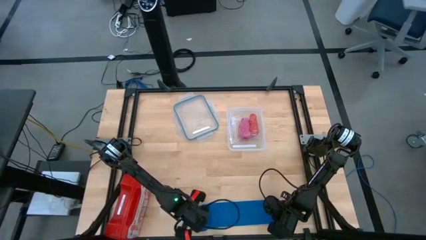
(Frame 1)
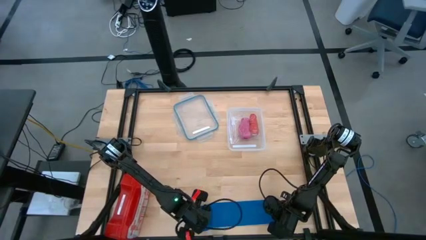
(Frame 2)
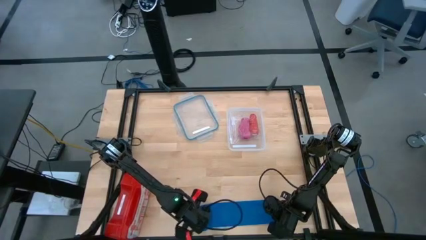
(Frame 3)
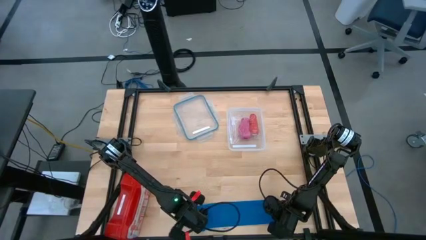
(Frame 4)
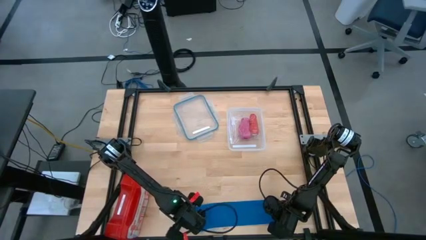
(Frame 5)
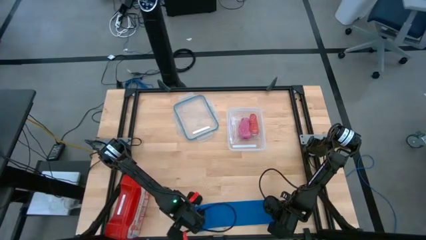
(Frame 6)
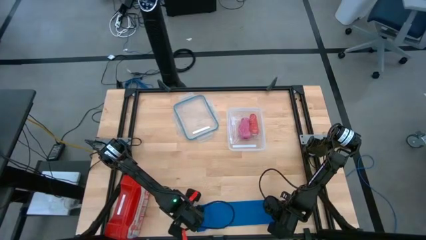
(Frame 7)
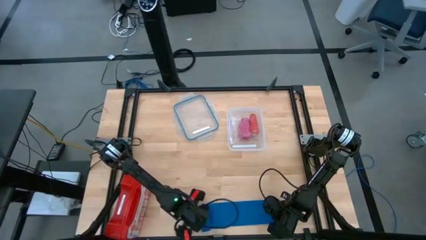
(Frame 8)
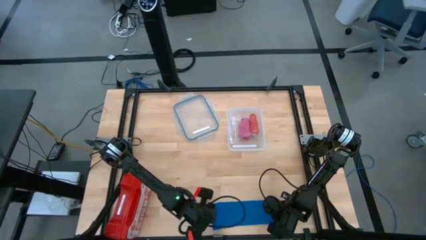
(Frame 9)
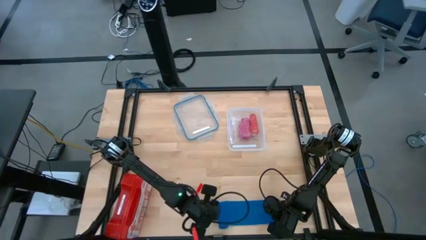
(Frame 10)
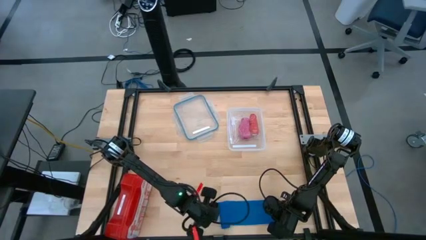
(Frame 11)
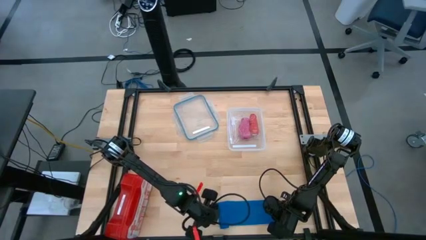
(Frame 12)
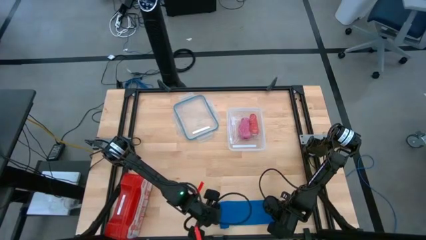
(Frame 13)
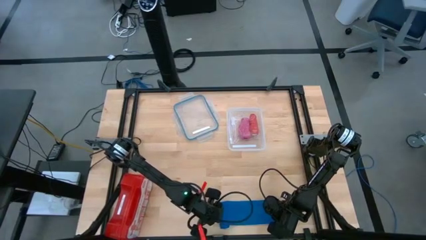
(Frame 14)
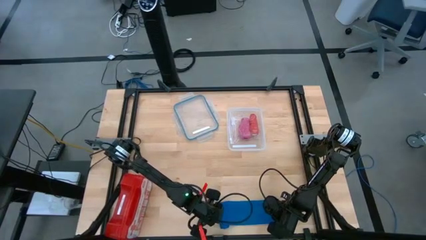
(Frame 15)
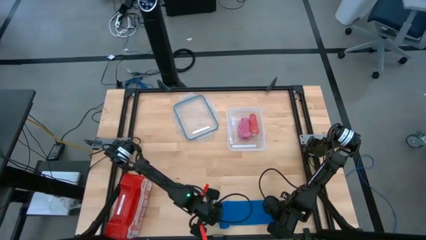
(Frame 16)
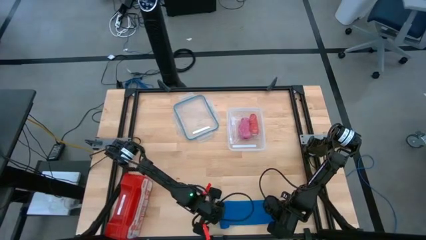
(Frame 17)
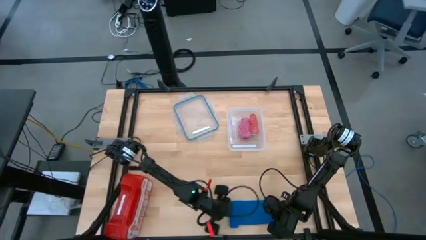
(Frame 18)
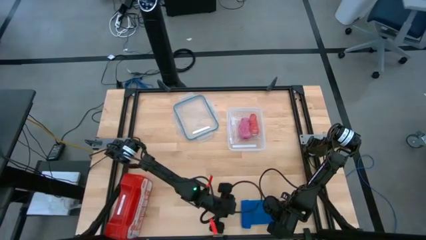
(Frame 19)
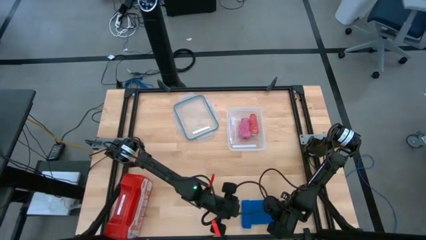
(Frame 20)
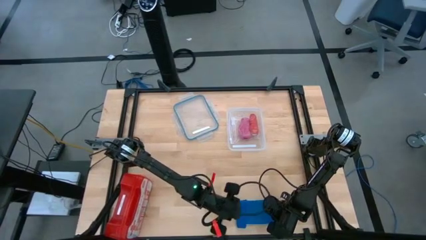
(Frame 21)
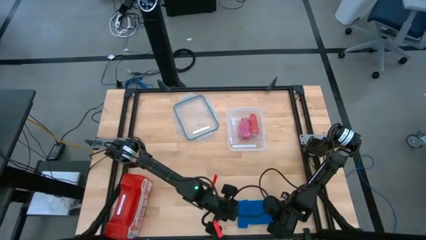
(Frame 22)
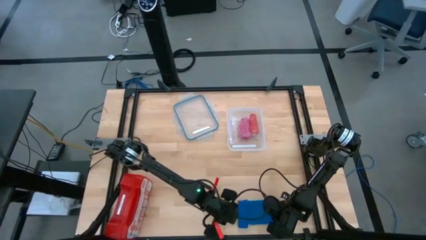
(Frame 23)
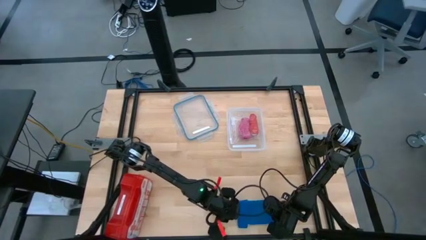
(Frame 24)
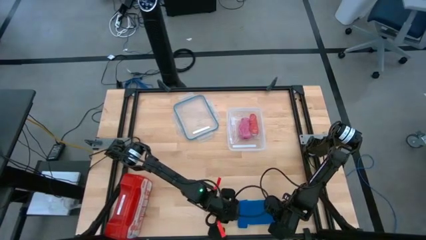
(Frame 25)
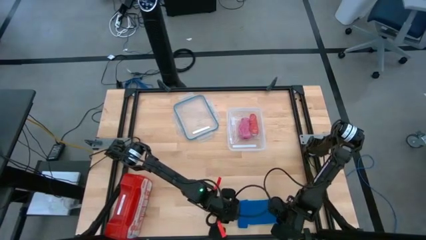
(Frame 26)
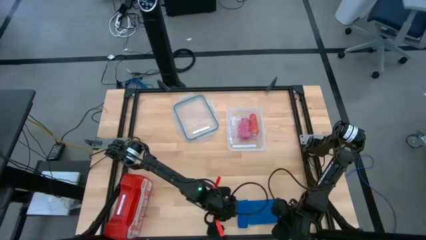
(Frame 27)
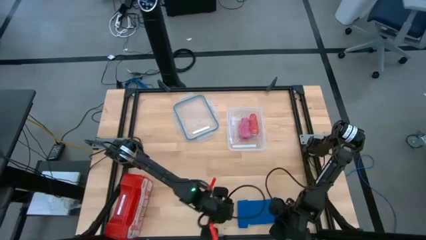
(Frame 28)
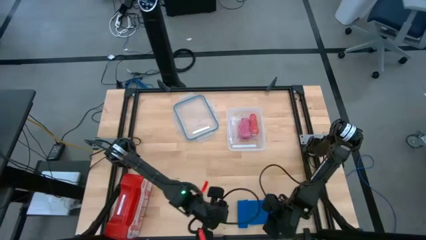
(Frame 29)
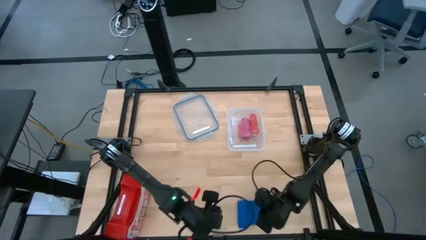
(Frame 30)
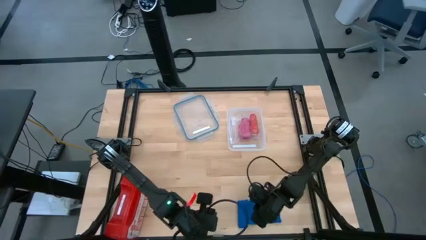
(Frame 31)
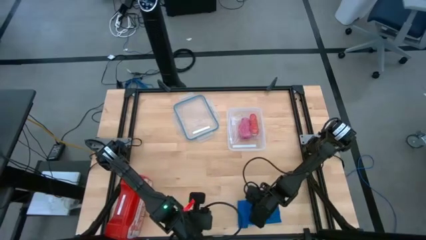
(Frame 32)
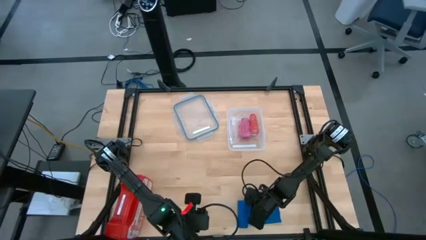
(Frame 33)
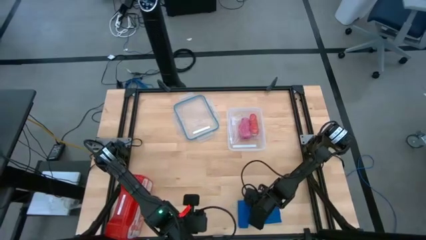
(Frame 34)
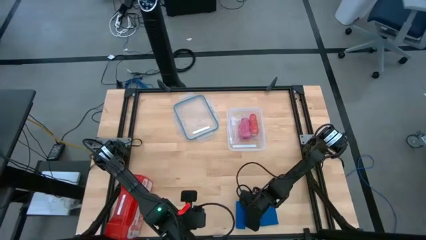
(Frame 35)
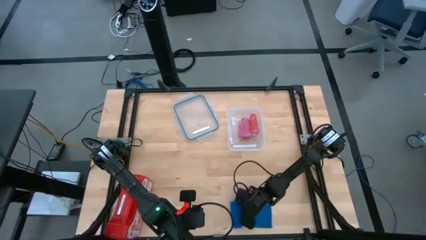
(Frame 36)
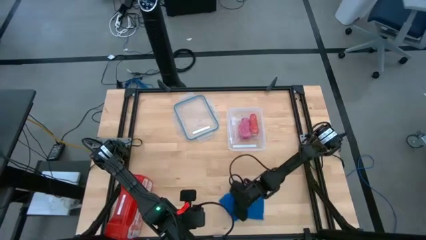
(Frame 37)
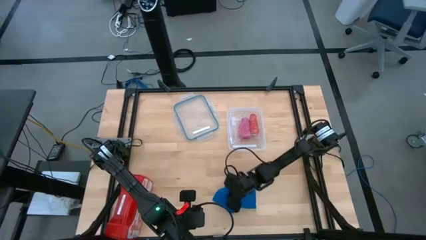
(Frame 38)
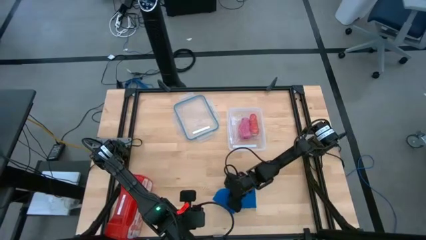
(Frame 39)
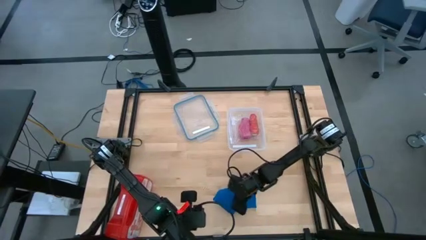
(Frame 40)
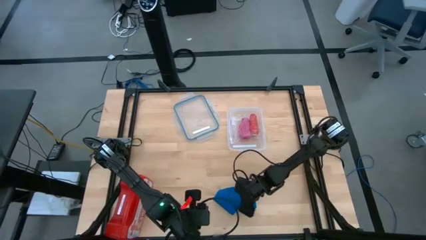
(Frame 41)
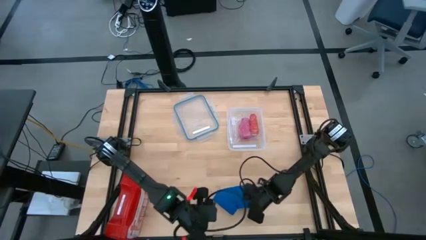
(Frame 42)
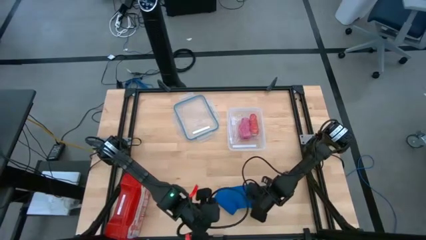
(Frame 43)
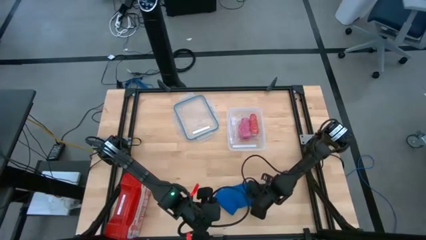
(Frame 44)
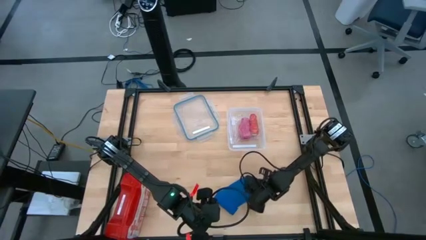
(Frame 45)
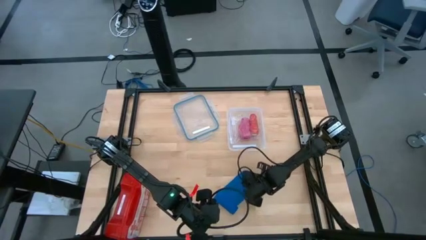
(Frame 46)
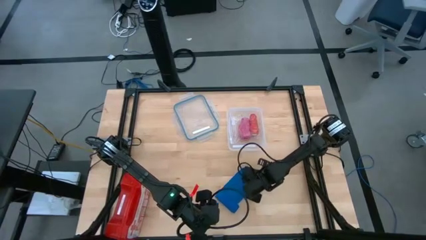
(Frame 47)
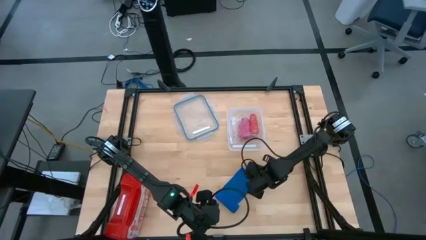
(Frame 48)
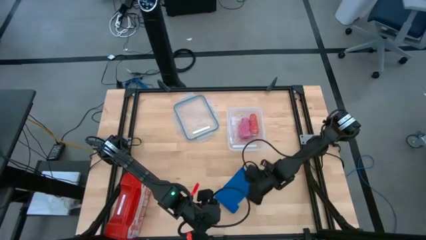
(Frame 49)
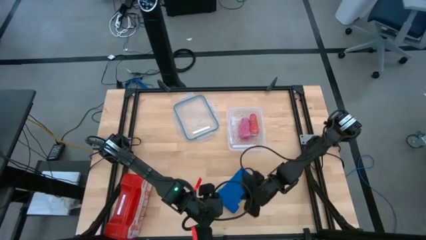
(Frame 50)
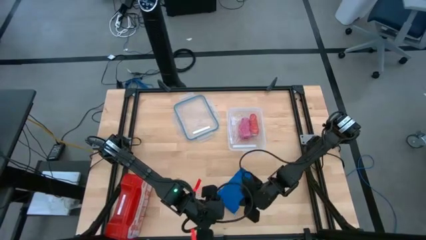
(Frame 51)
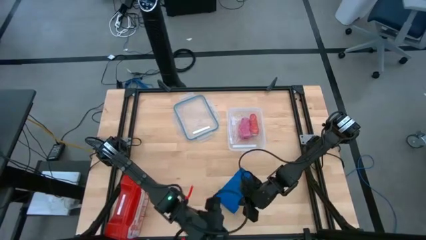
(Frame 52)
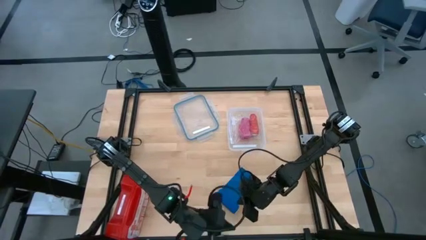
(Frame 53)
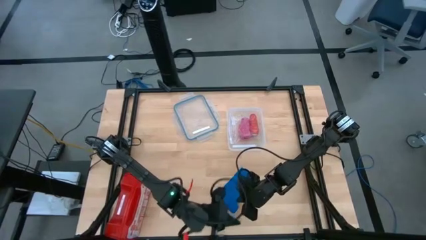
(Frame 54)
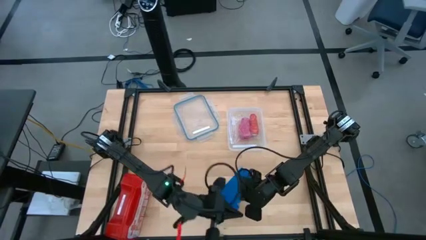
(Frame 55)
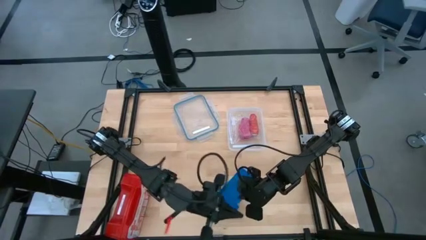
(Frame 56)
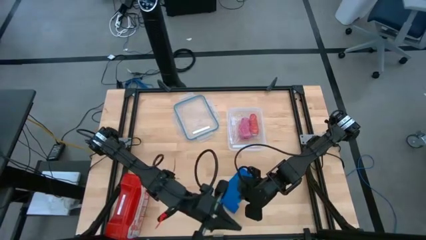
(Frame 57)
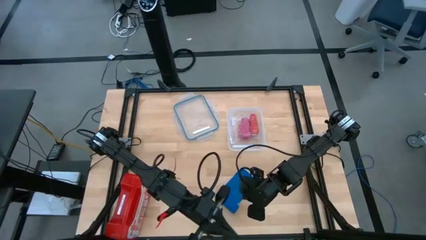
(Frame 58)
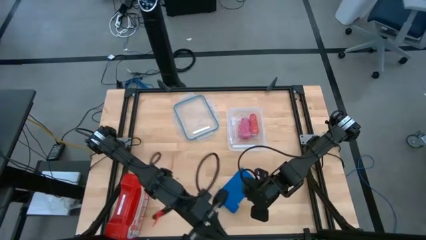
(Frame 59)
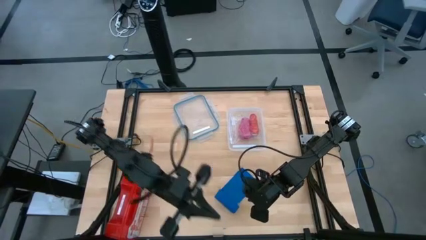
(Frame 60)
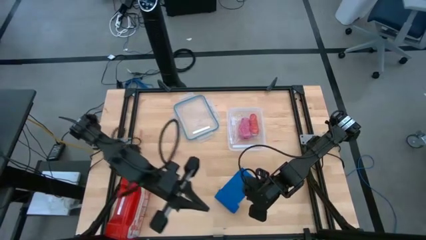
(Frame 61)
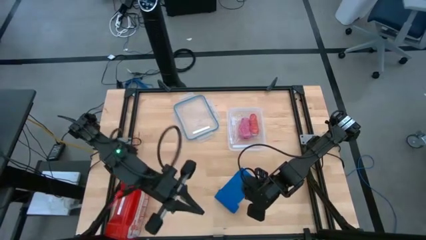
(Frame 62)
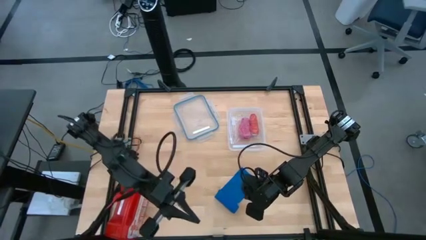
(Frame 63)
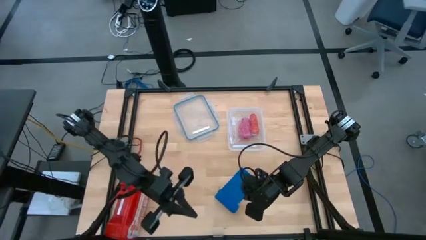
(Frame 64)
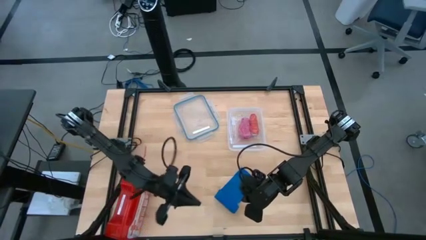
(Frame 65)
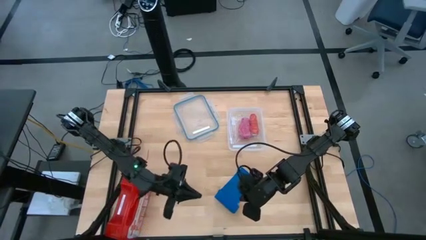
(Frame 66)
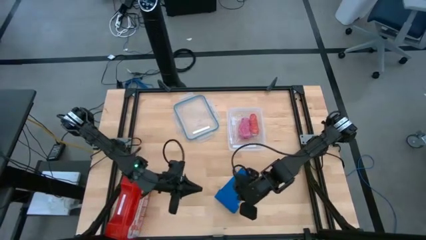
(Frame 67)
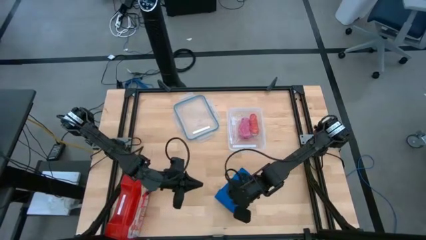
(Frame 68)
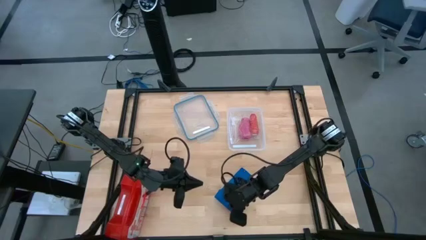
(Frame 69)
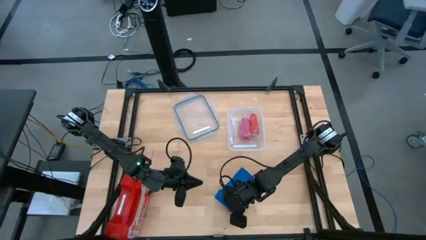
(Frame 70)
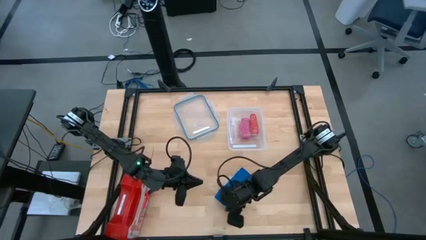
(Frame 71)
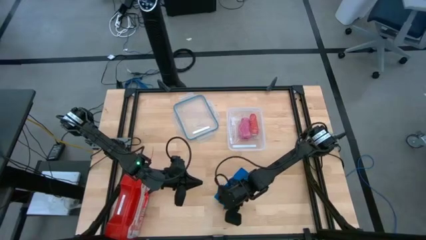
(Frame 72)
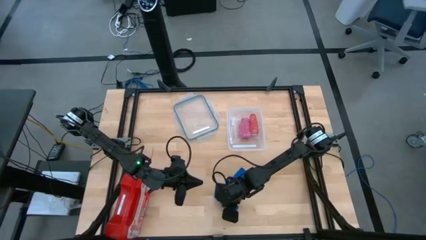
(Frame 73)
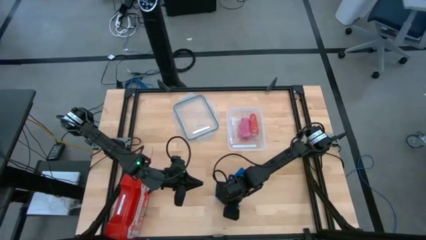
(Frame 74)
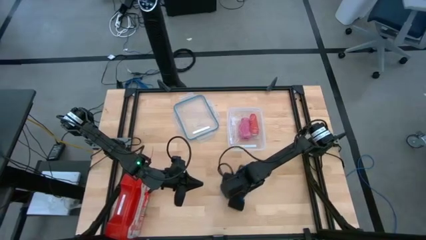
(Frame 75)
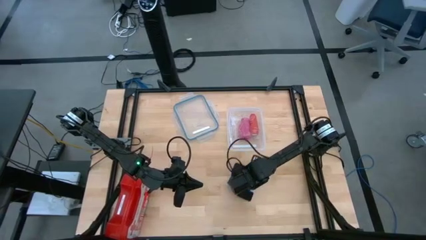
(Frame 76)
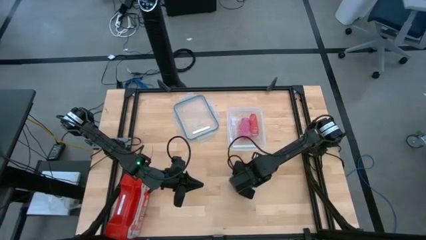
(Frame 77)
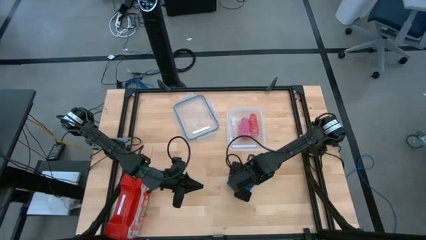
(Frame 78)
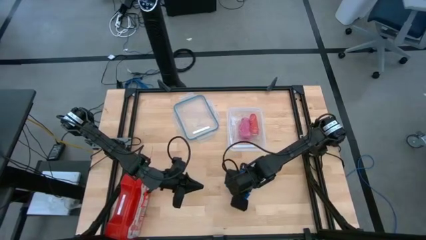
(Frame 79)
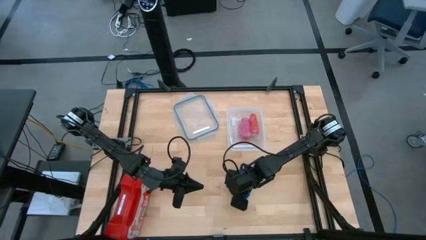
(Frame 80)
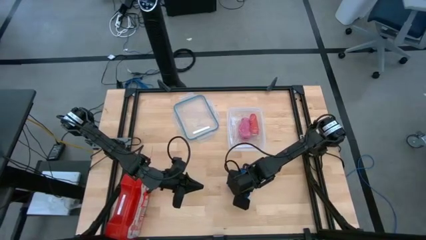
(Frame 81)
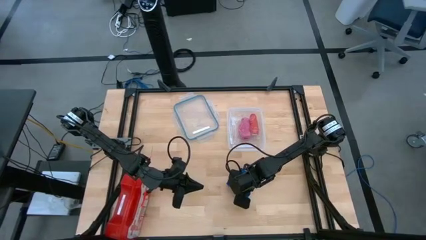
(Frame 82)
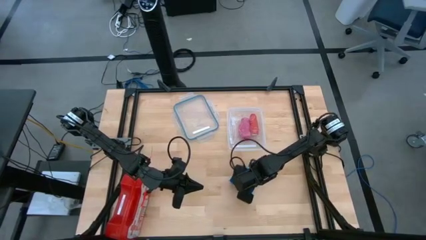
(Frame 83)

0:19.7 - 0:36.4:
Task: Roll bandage
Roll the blue bandage
